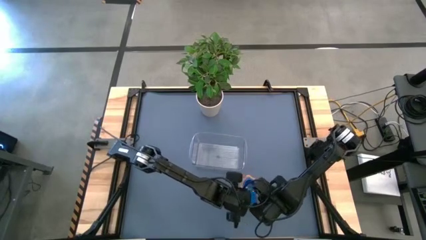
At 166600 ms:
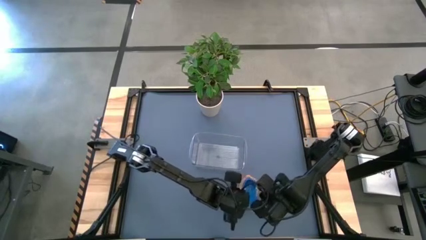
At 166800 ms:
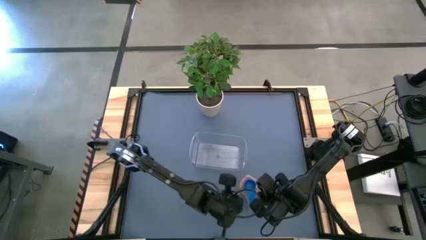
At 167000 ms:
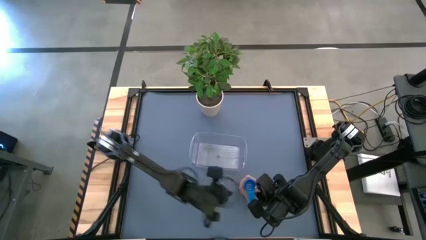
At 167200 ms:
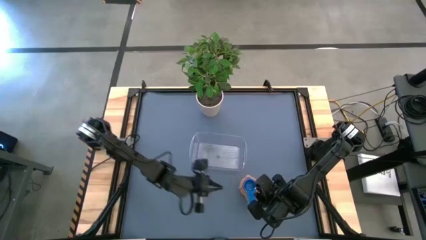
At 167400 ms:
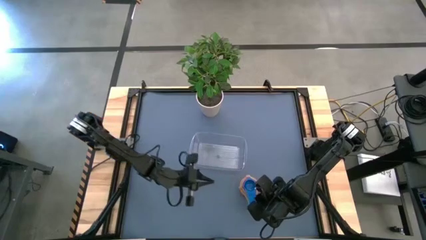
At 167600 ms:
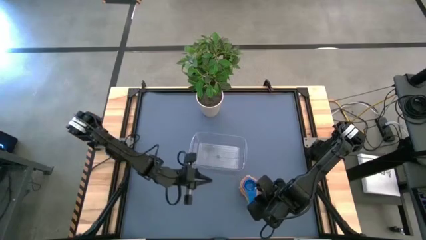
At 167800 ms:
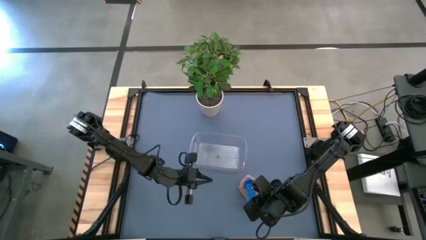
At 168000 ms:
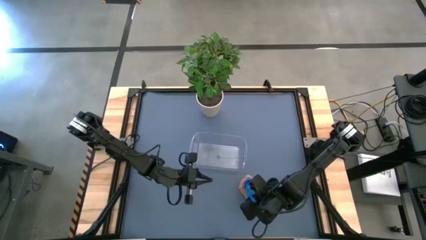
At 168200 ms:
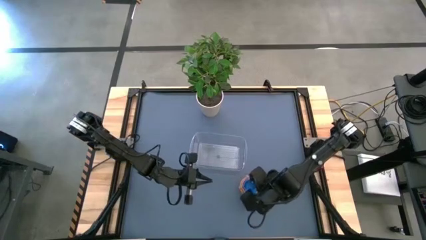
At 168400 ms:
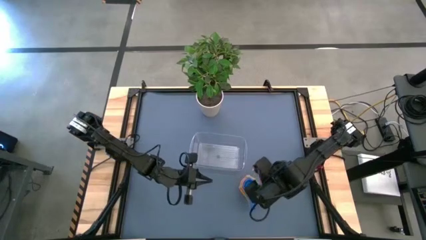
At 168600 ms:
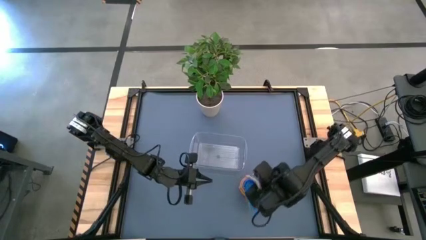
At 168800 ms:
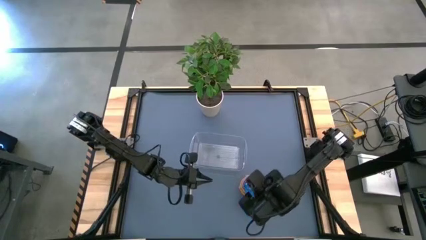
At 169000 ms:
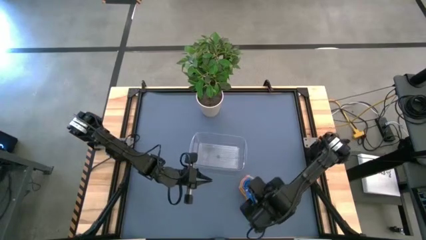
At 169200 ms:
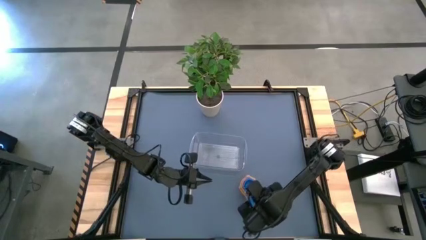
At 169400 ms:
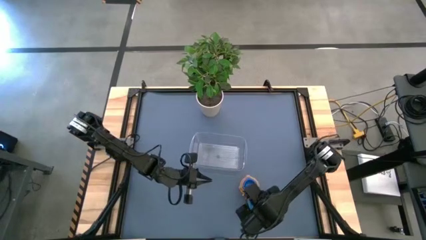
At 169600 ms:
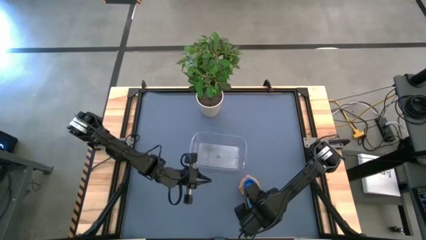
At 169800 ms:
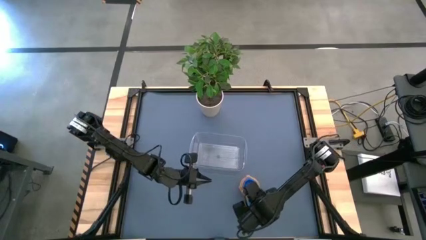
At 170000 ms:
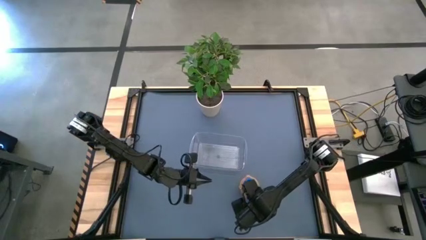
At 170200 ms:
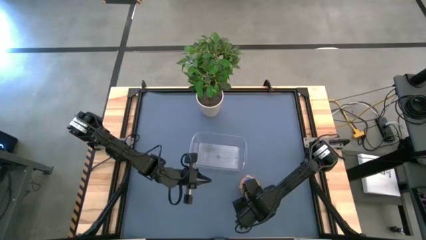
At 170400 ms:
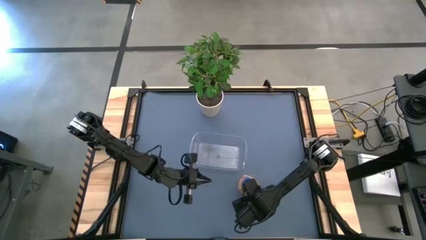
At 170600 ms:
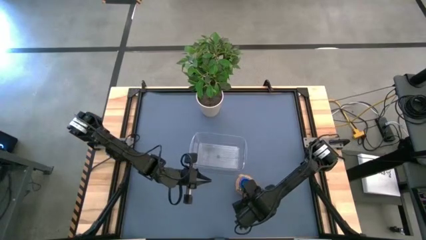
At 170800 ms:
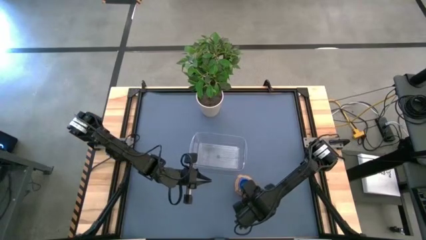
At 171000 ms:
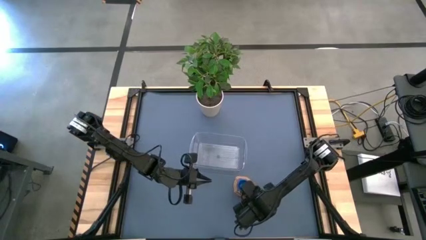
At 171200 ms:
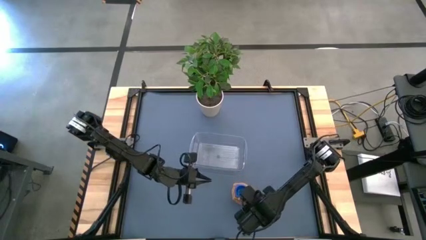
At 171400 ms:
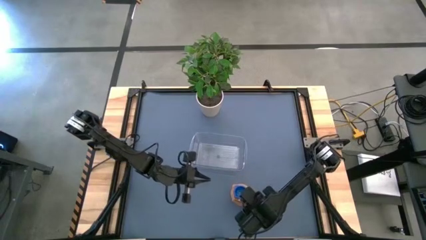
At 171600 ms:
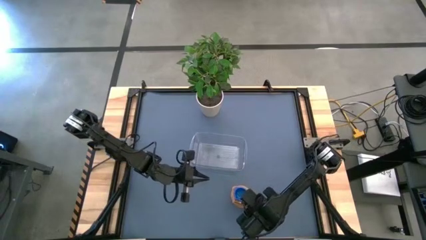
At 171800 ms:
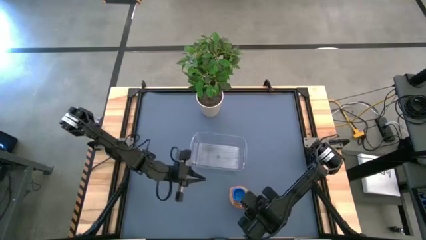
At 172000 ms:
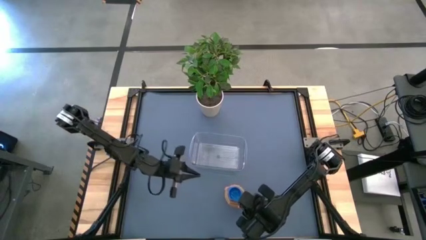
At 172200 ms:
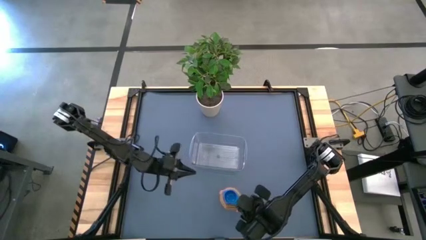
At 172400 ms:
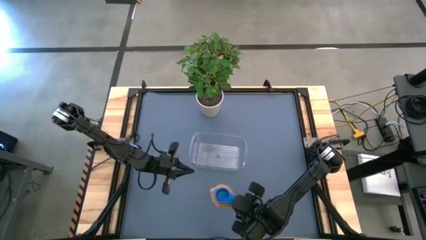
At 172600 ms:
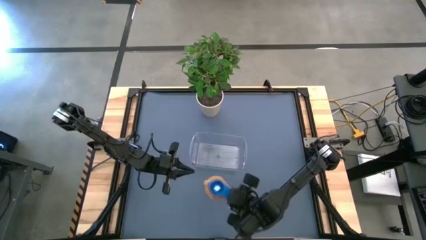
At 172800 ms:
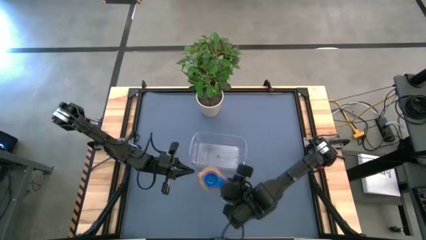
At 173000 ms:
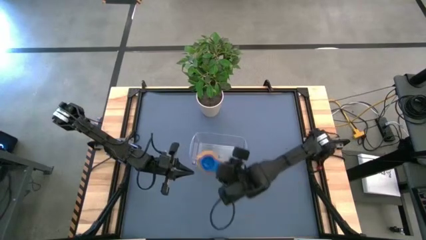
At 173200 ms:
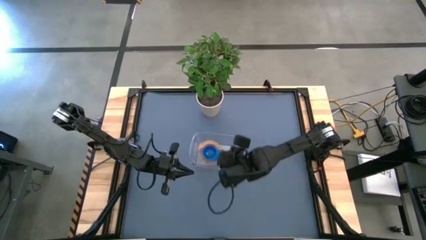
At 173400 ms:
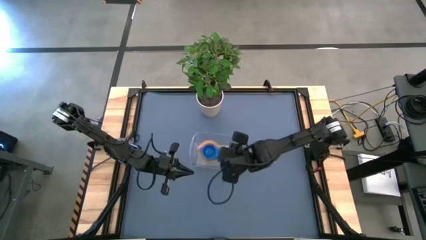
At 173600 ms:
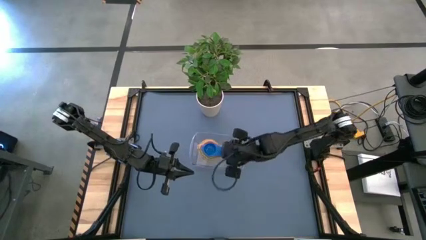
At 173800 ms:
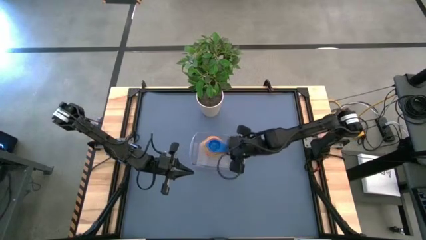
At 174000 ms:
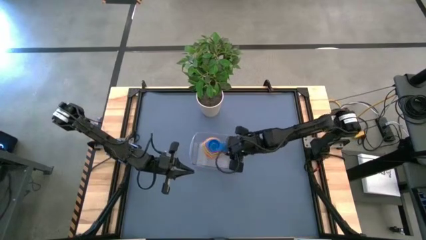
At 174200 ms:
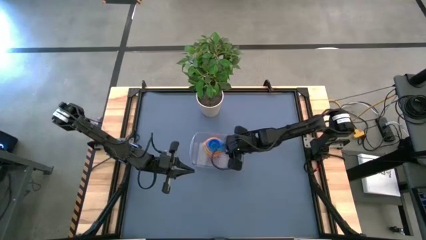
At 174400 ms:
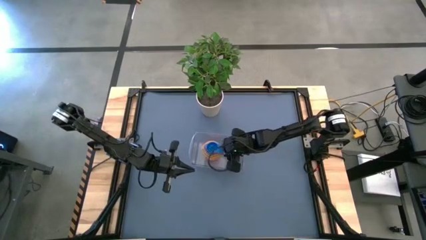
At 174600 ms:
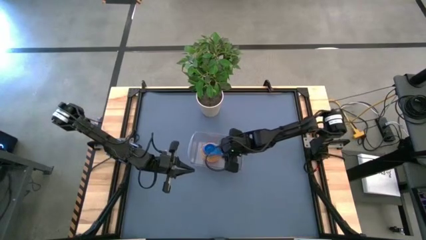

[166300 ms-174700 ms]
Task: Nest measuring cups in basket
Put the stacked measuring cups into the transparent bin

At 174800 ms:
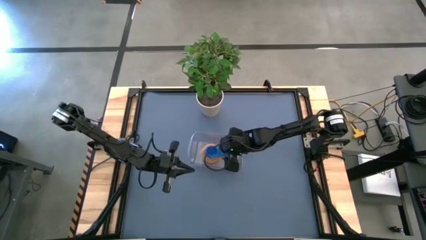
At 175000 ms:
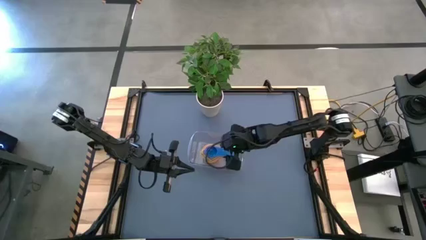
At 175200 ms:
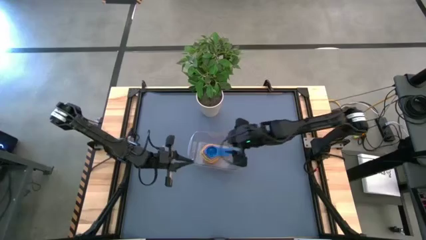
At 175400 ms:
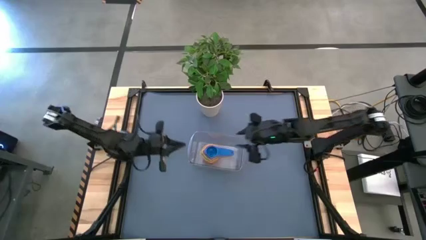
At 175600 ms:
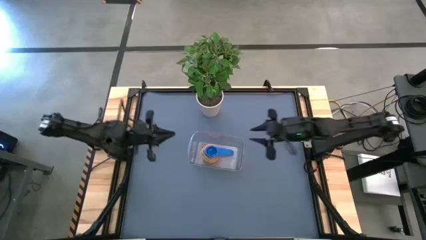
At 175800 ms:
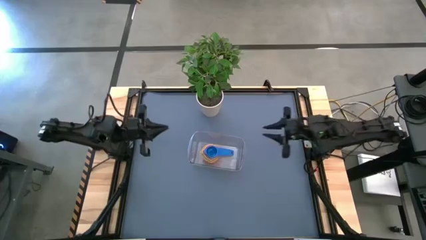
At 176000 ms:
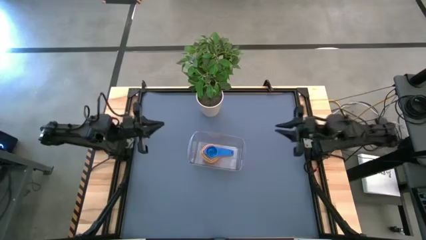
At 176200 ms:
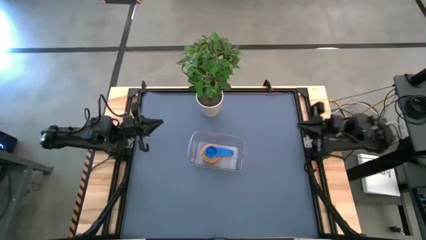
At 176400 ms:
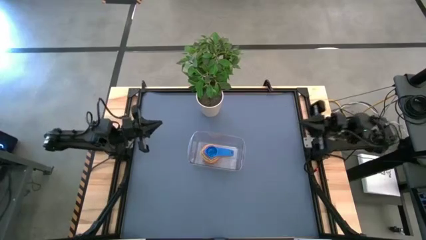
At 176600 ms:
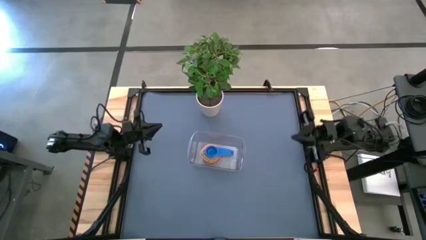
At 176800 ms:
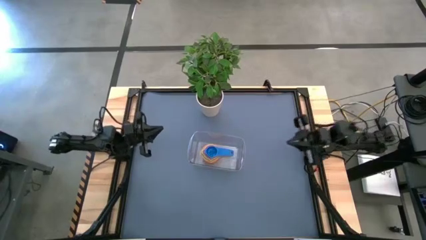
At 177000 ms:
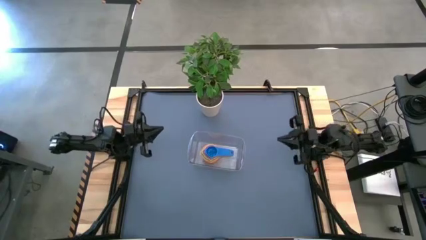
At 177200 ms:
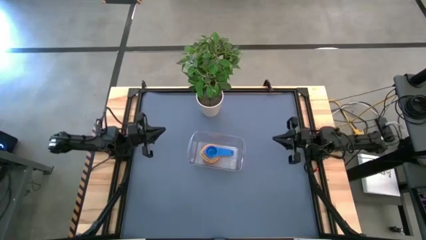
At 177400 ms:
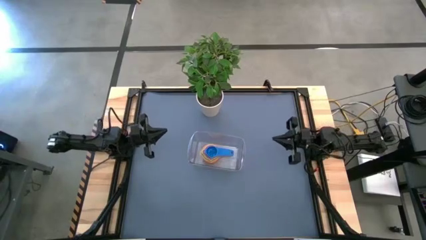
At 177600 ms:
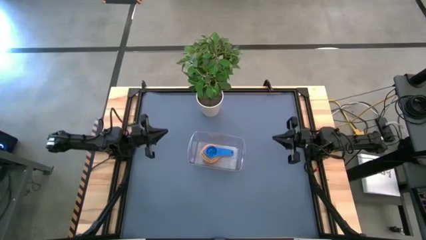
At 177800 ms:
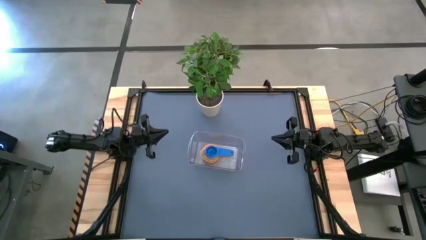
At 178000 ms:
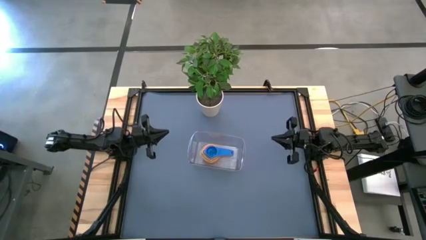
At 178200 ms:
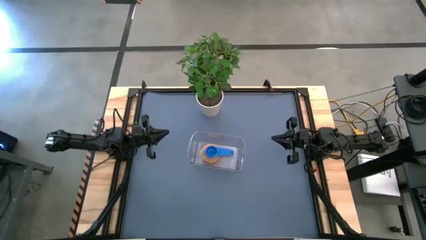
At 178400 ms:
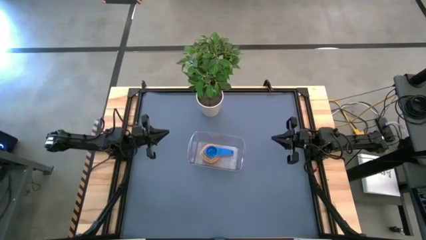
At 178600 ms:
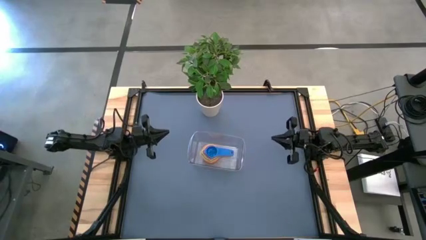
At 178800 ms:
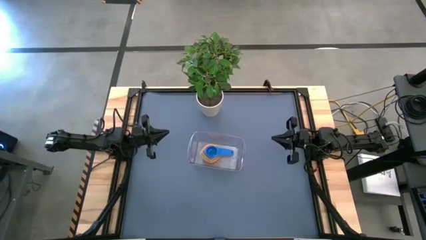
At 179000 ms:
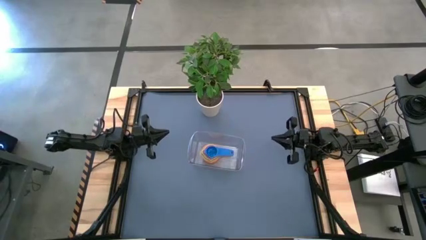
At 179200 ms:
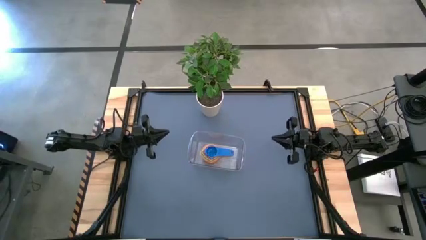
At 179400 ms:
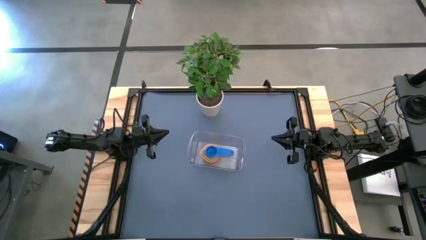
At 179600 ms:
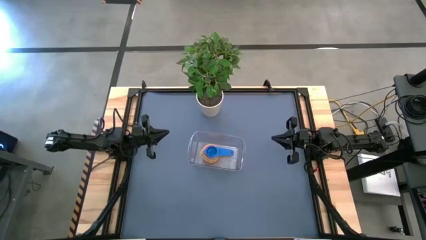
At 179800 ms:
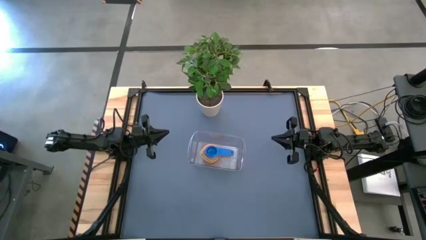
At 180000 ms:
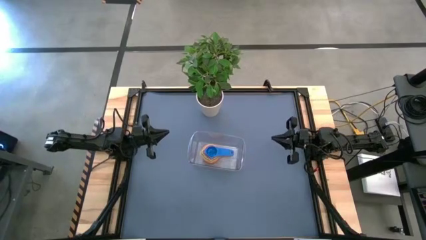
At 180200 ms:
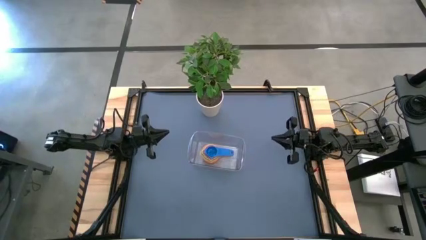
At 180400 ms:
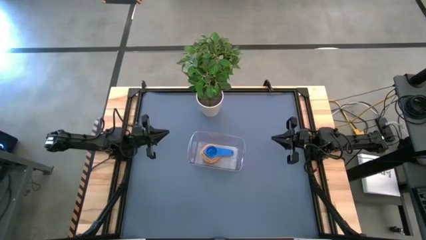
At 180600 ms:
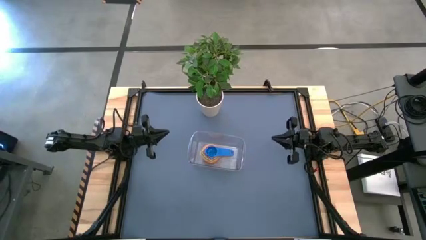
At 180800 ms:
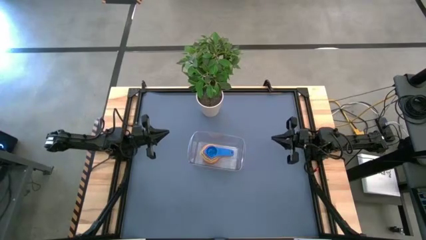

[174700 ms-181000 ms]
Return to Home Position
